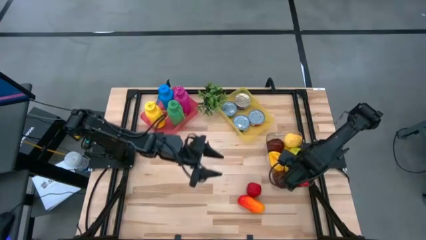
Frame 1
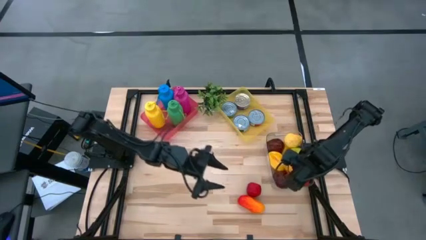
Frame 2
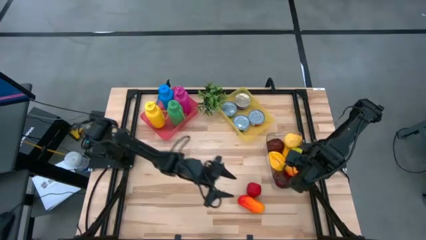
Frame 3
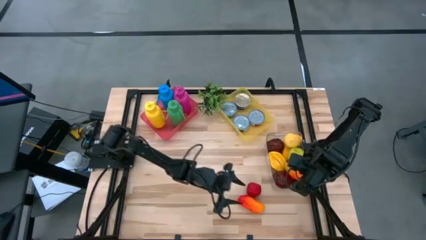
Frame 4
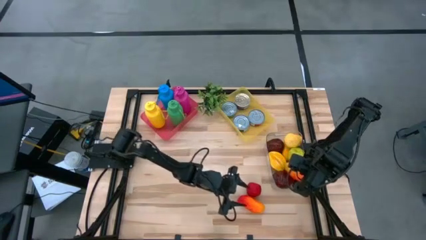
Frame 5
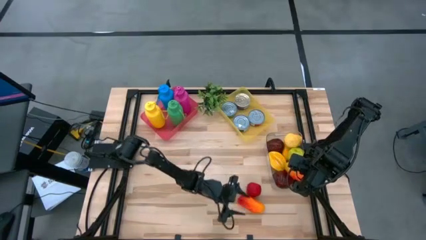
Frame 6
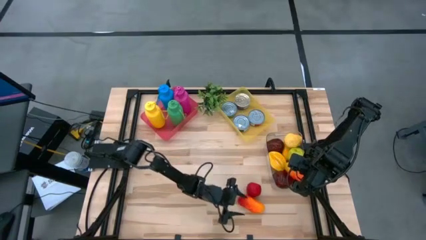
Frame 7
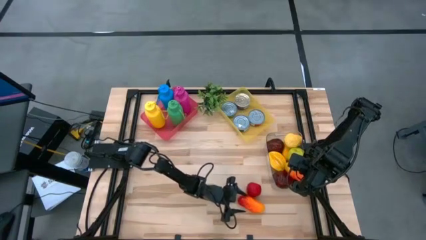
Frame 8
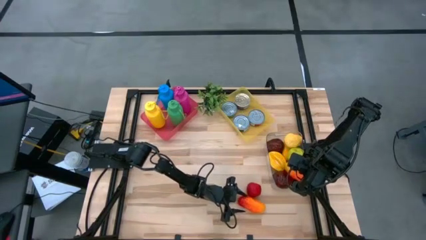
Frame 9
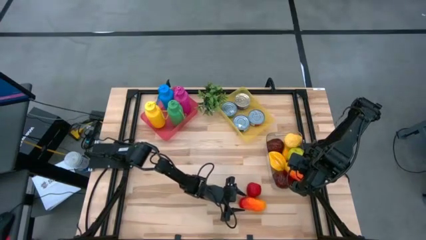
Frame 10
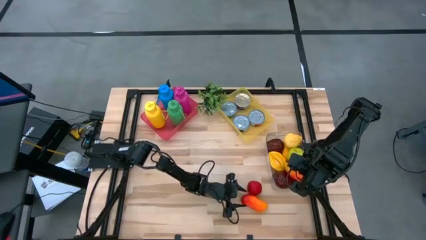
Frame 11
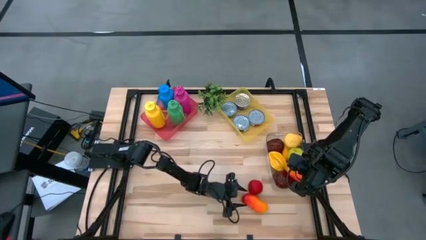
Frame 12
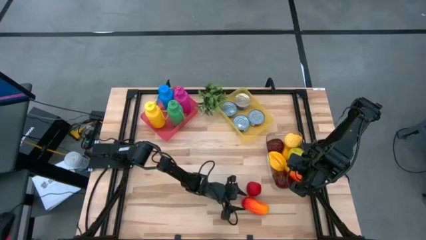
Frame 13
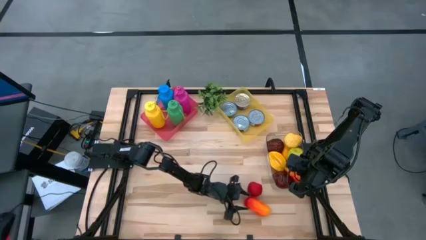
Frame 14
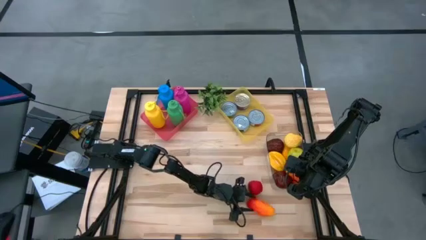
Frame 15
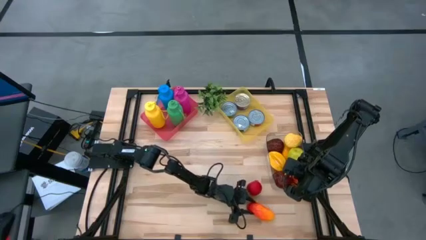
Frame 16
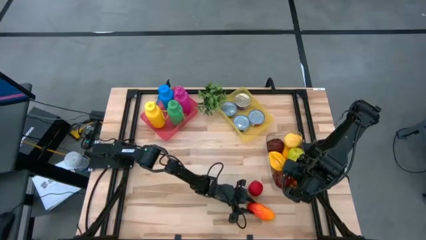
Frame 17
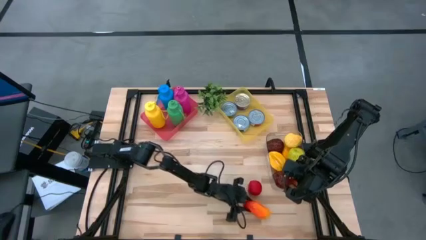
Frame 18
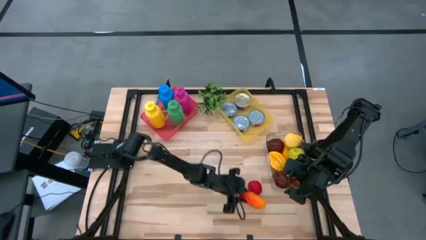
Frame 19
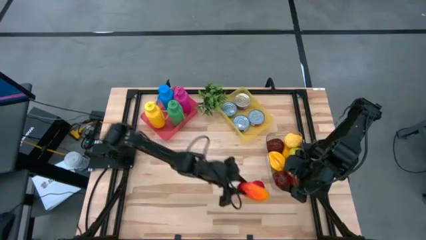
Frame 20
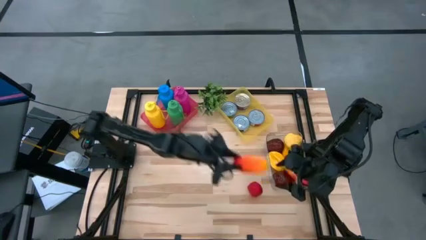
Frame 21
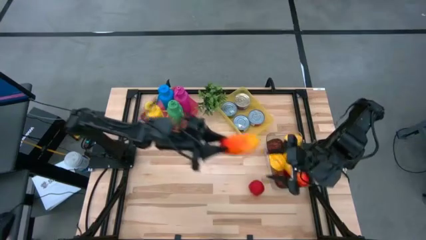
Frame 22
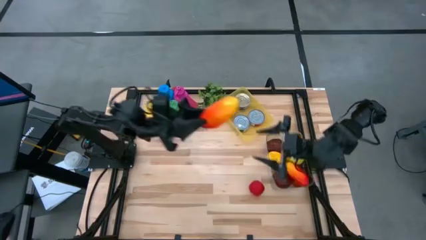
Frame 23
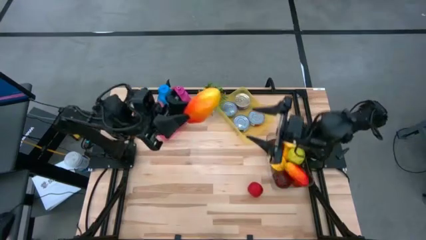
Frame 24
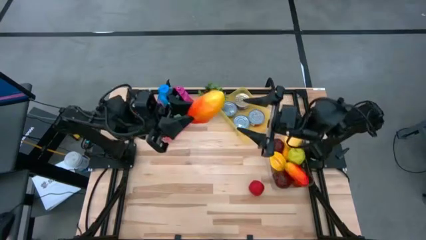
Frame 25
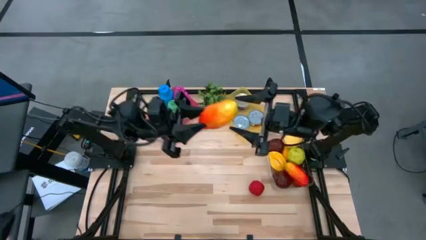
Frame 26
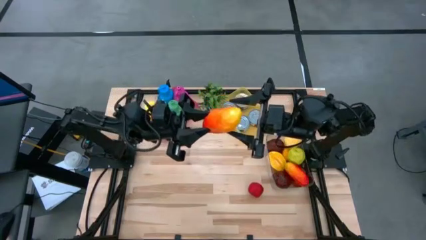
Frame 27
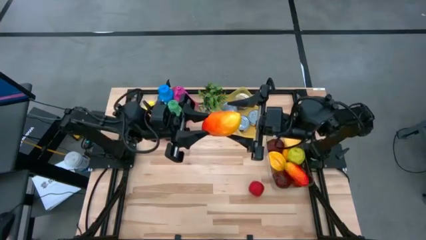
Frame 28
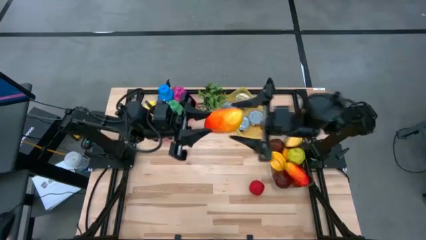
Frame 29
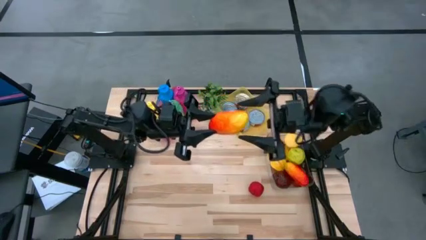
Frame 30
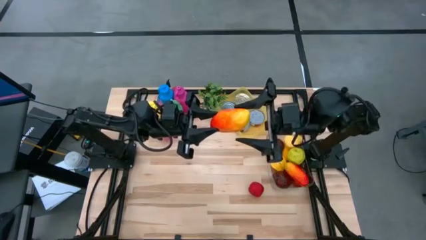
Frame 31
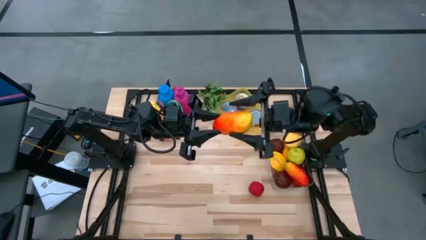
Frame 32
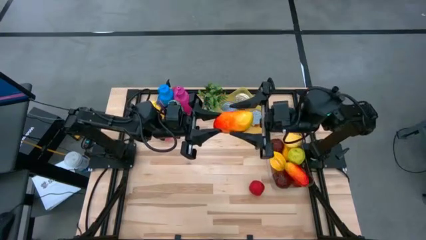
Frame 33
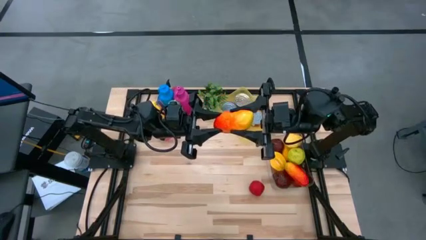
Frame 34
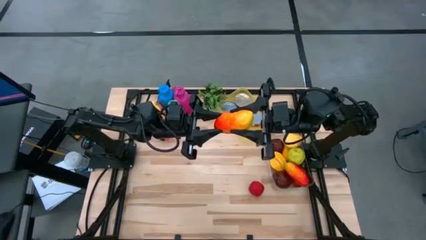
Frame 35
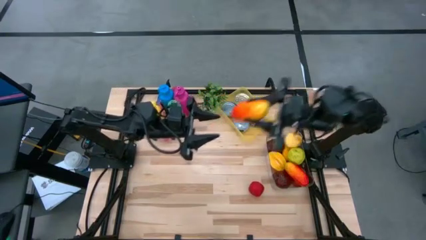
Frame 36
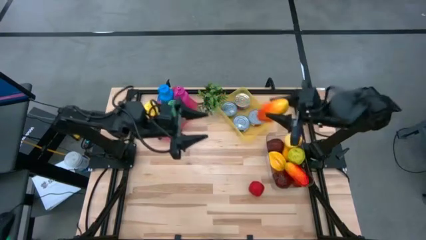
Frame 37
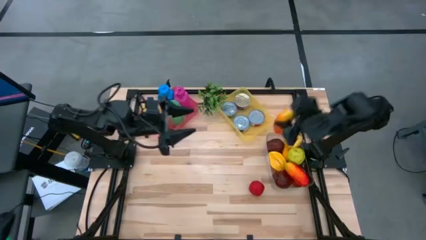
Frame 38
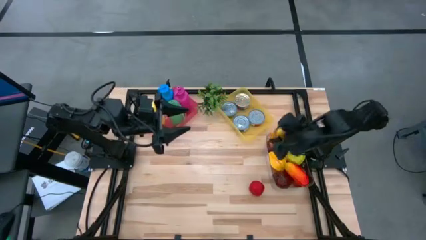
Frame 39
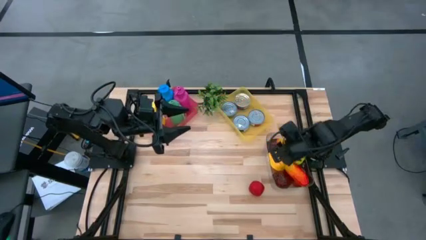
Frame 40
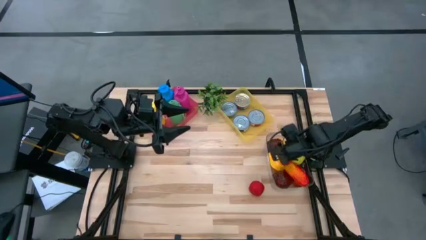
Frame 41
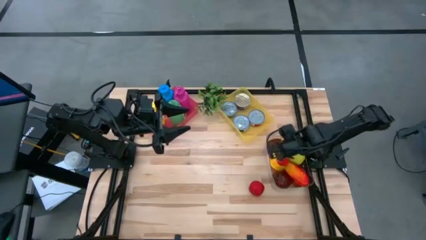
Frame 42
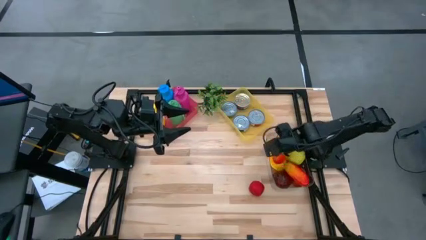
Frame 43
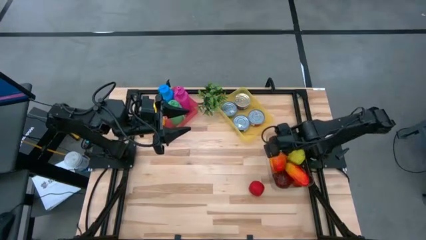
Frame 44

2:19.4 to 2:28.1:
Task: Pick & Place Food Item
Put the red mango into the transparent bin

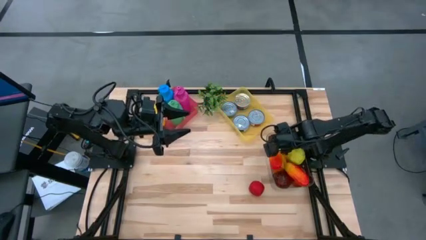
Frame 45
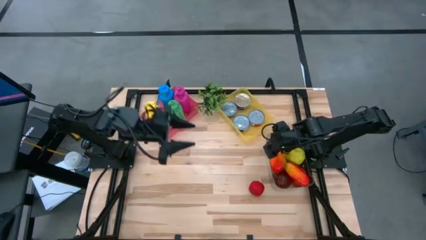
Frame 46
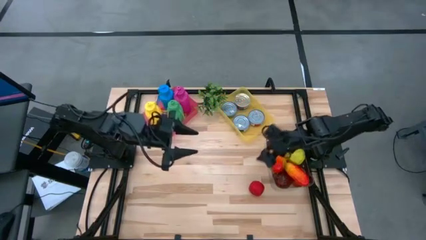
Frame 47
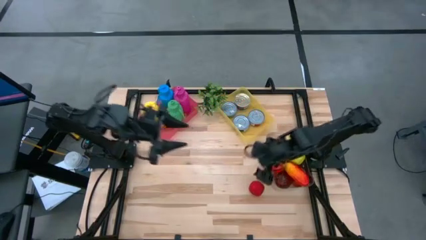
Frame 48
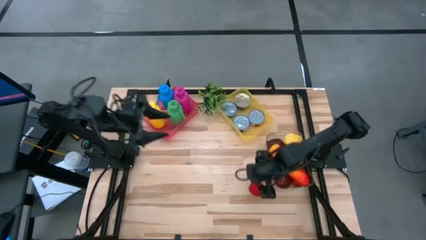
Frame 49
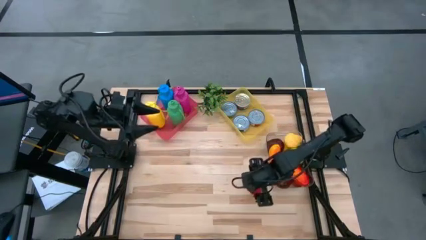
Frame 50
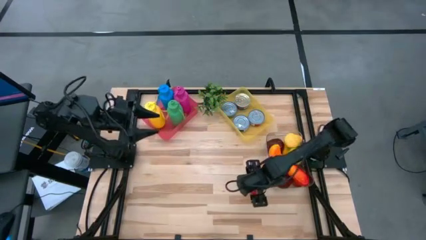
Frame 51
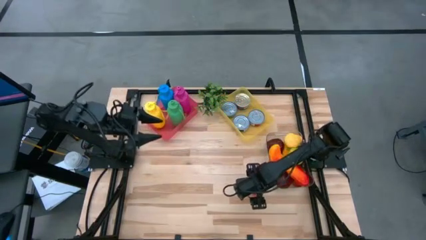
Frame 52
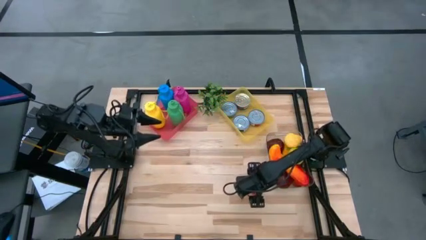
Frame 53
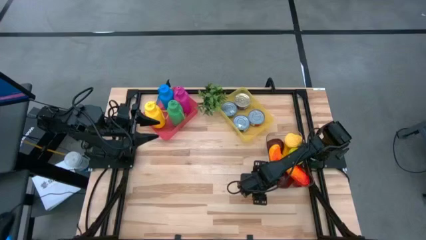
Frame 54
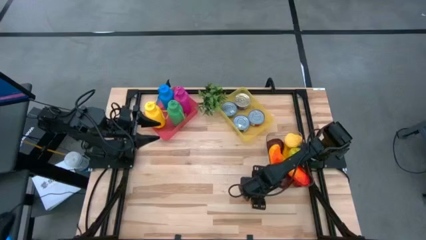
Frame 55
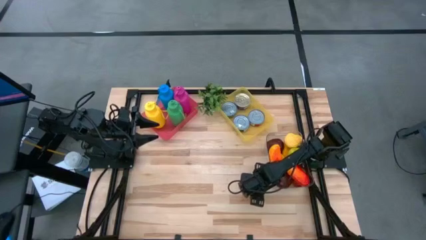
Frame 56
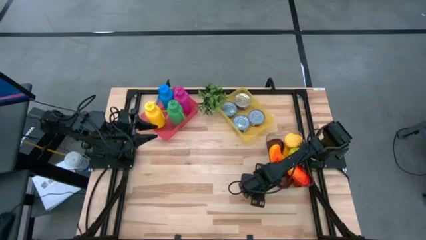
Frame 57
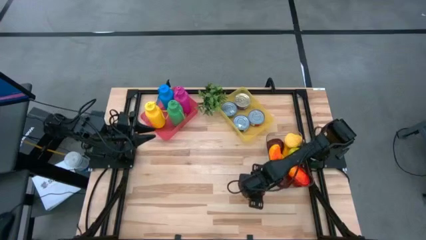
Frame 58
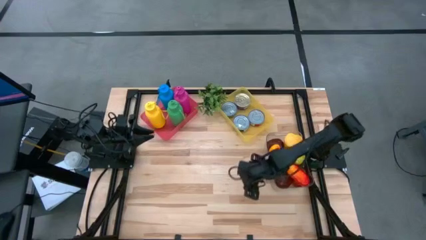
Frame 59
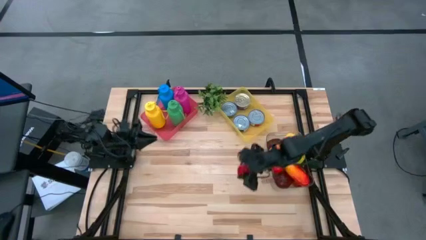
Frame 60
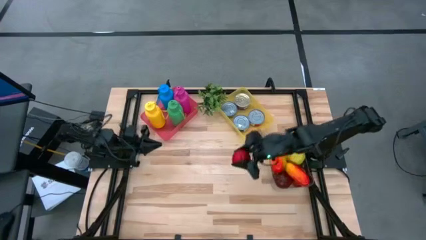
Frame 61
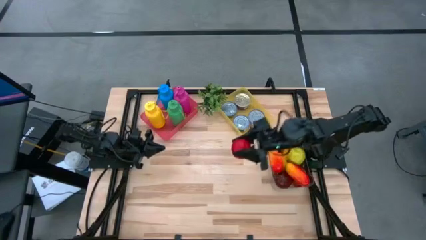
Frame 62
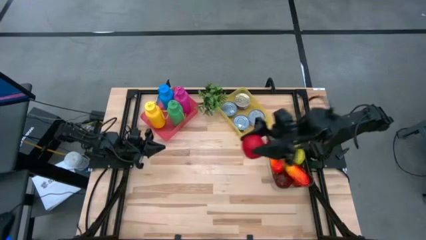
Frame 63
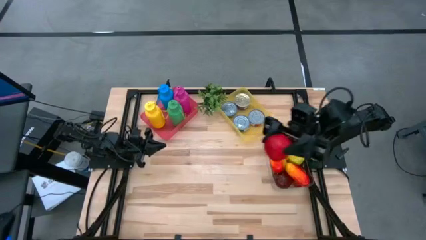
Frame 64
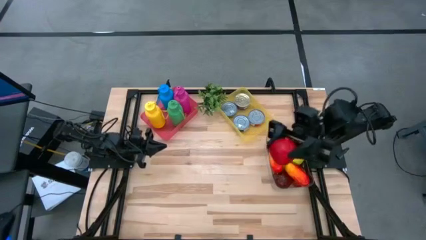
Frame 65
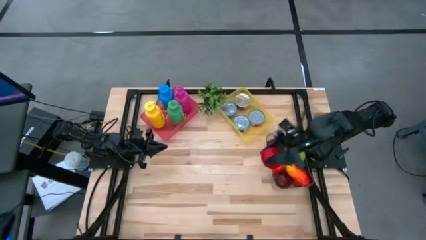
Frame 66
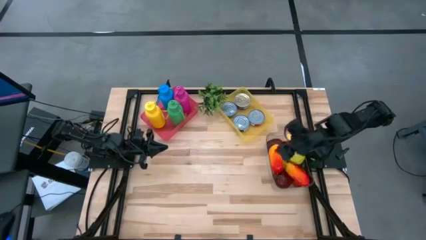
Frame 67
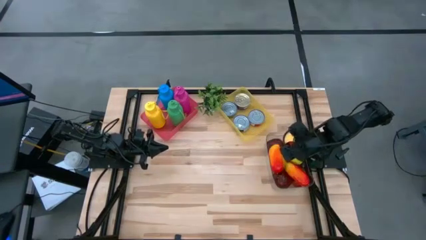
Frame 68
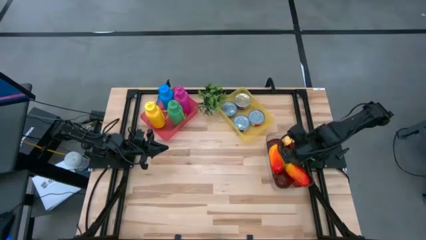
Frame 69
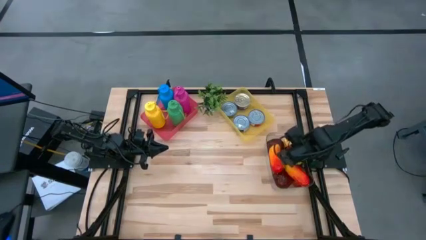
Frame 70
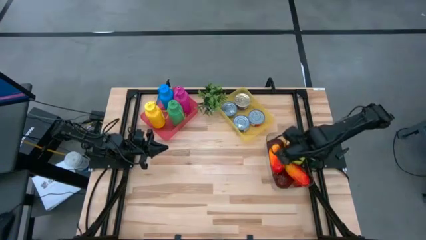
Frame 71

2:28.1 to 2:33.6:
Put the red apple into the transparent bin

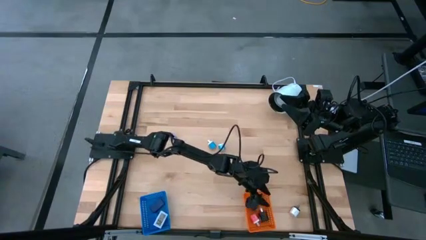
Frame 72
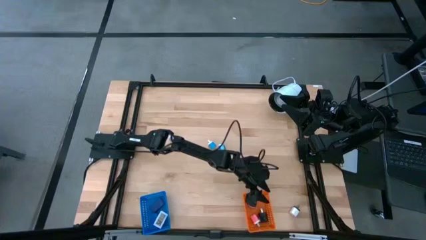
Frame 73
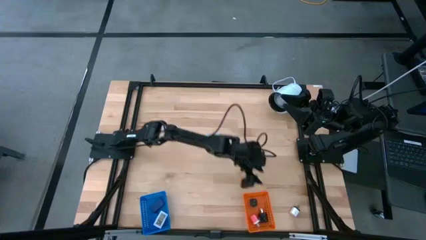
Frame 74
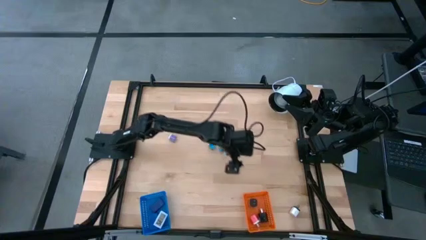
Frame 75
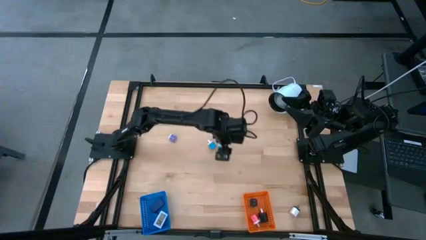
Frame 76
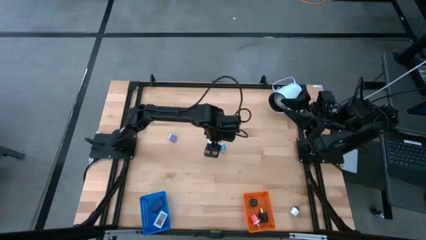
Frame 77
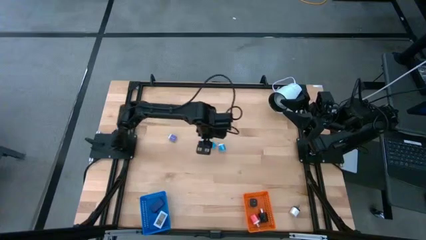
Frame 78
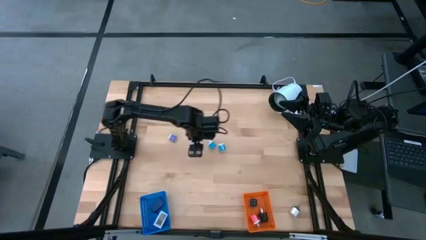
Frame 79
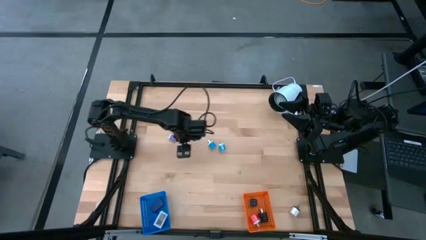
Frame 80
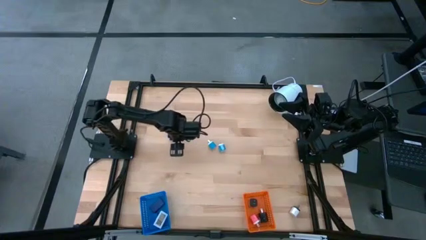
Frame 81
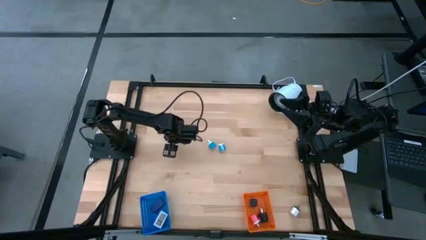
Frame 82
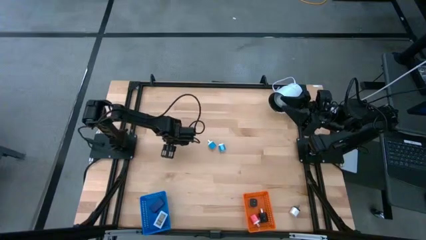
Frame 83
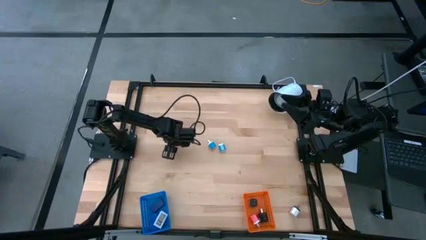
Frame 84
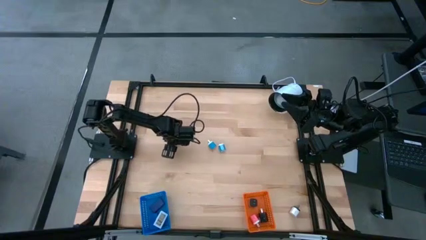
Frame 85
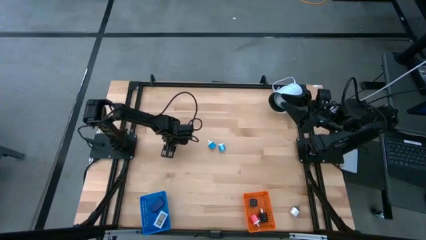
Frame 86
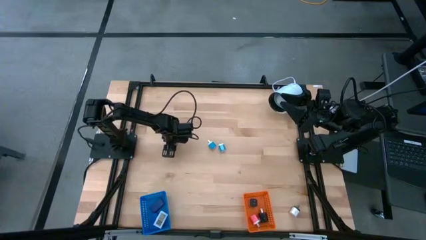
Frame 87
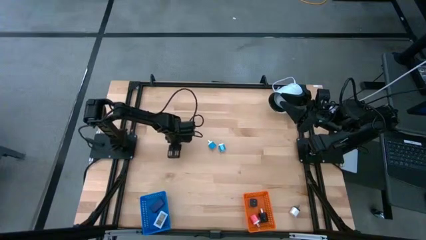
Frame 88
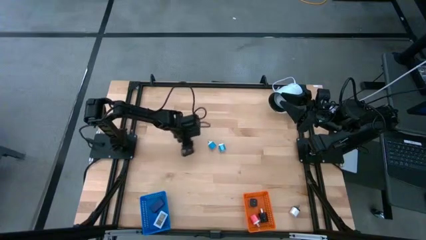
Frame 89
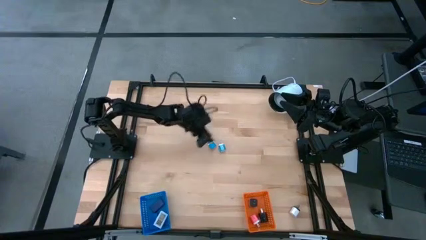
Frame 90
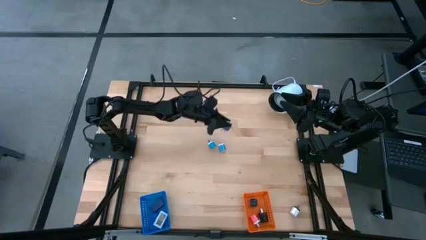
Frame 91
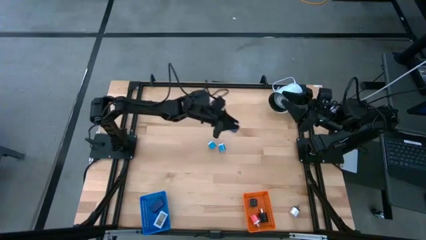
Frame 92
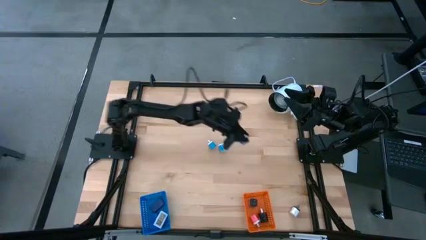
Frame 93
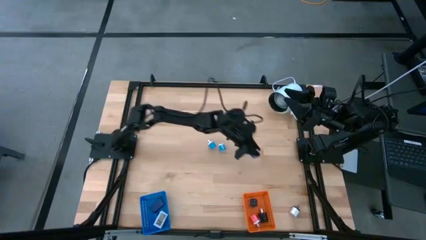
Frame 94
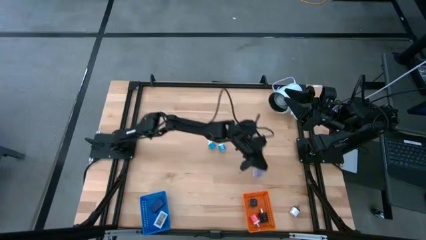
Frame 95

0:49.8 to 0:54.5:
Task: Pick & Place Office items
Put the purple charger adapter into the orange bin
